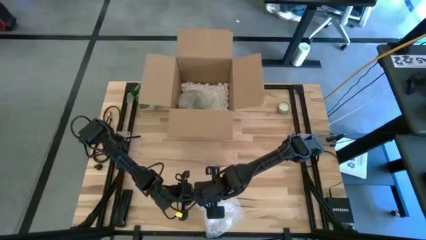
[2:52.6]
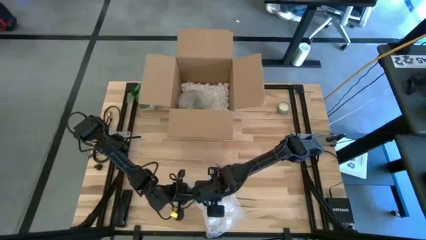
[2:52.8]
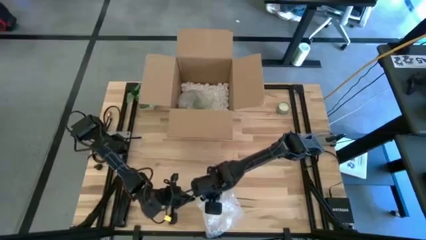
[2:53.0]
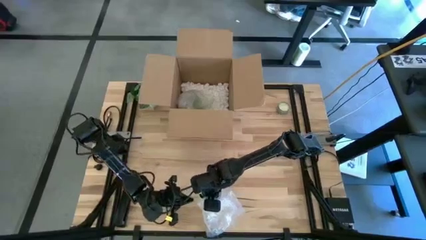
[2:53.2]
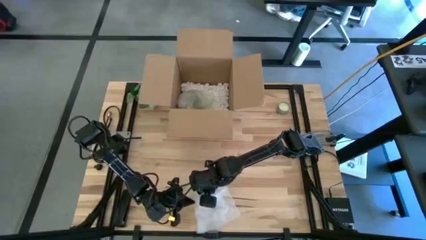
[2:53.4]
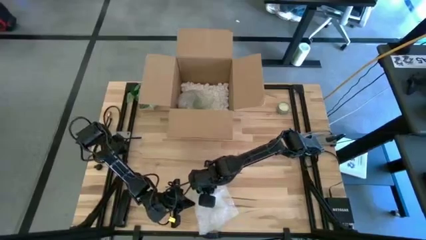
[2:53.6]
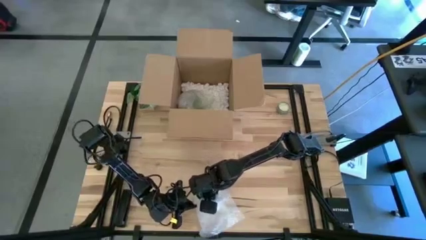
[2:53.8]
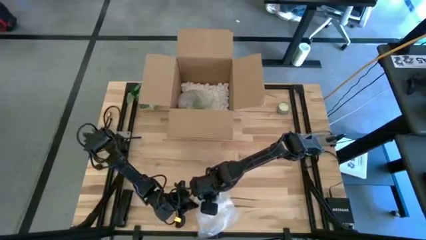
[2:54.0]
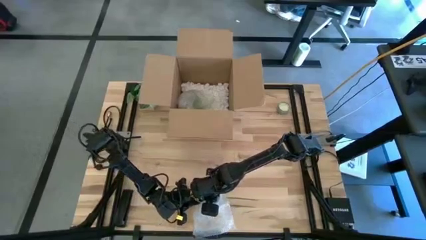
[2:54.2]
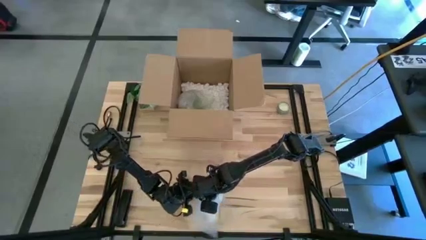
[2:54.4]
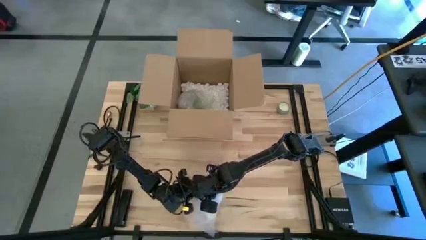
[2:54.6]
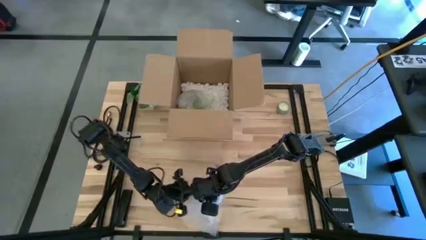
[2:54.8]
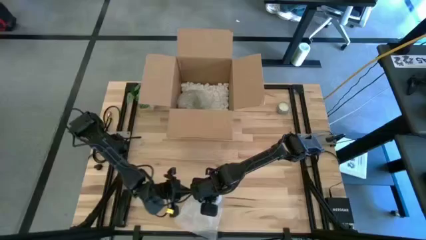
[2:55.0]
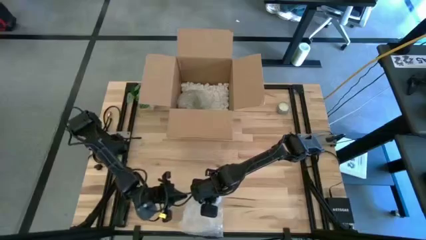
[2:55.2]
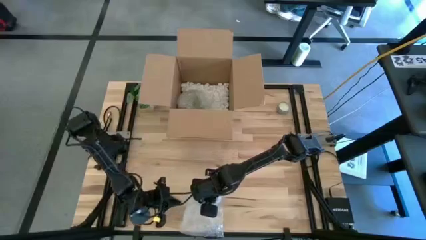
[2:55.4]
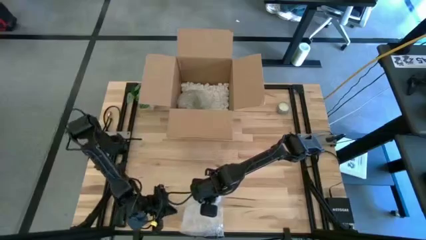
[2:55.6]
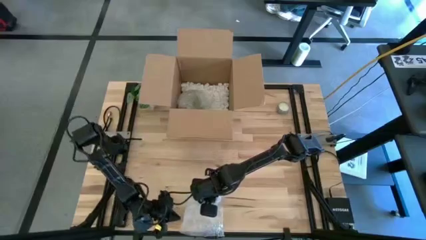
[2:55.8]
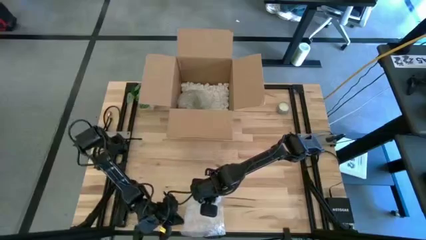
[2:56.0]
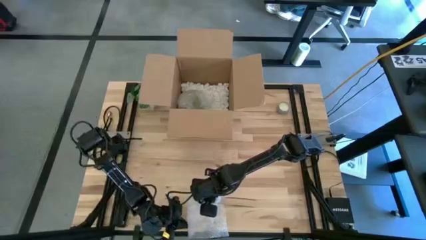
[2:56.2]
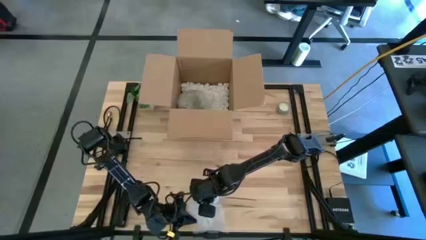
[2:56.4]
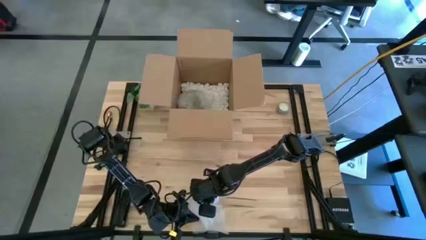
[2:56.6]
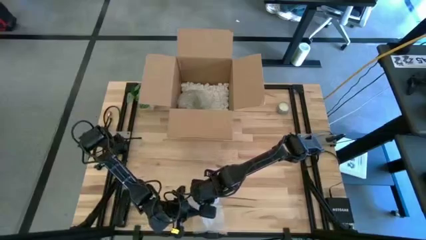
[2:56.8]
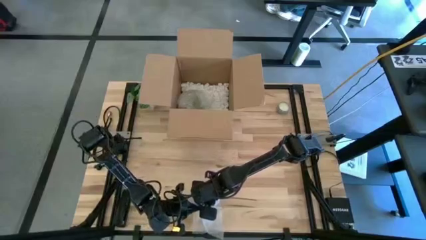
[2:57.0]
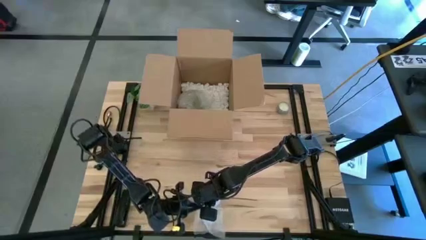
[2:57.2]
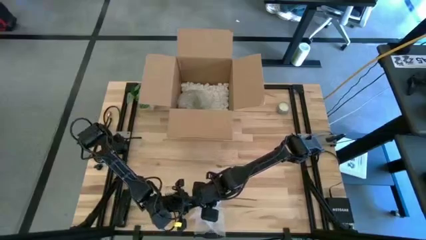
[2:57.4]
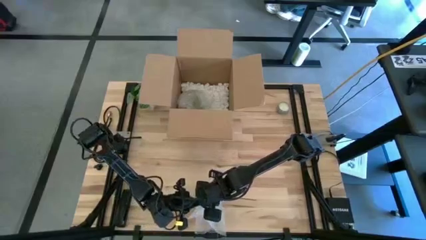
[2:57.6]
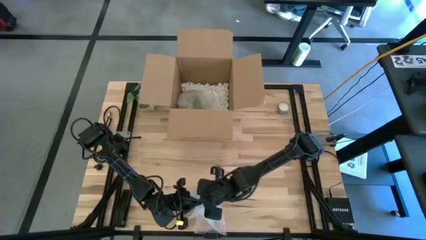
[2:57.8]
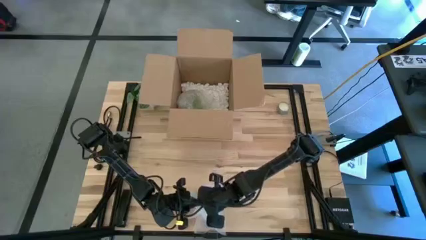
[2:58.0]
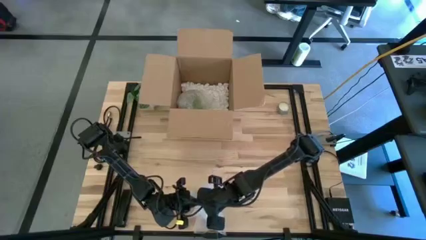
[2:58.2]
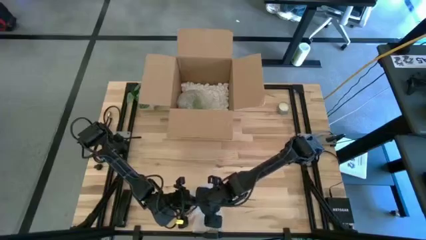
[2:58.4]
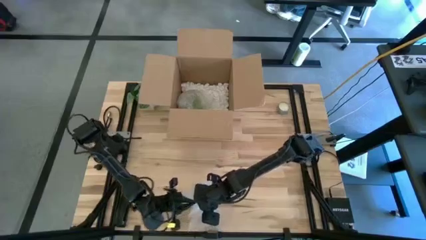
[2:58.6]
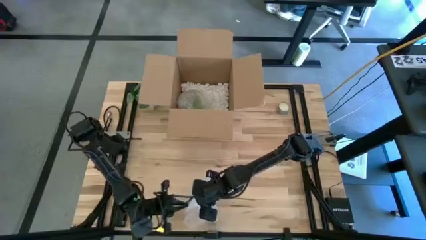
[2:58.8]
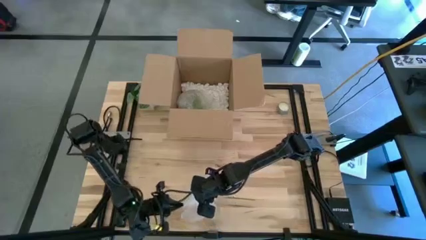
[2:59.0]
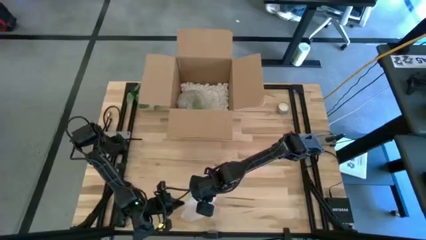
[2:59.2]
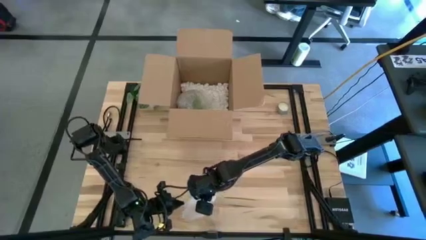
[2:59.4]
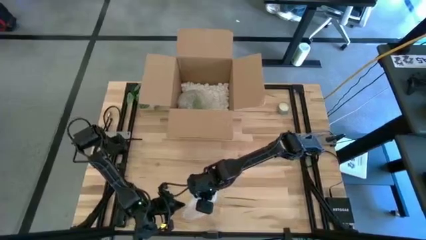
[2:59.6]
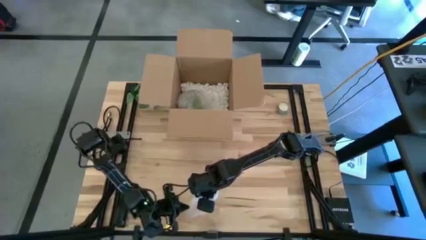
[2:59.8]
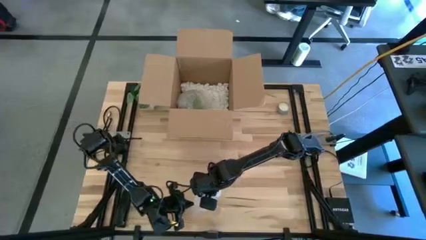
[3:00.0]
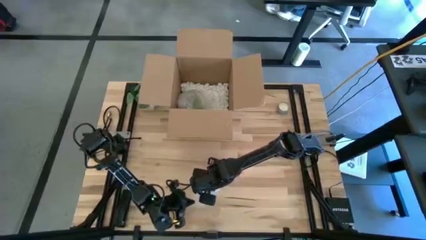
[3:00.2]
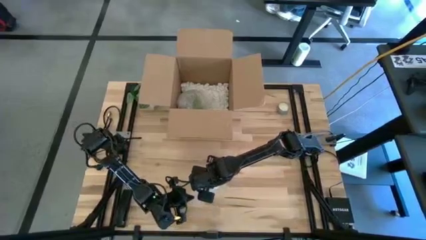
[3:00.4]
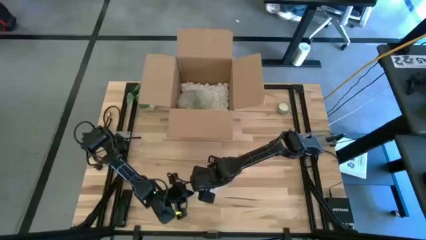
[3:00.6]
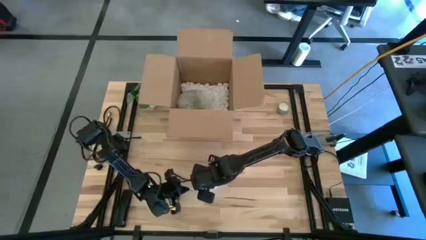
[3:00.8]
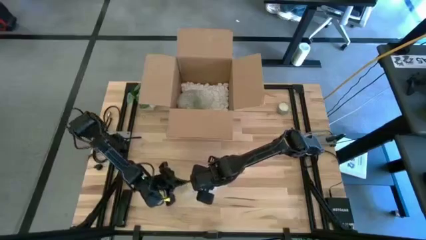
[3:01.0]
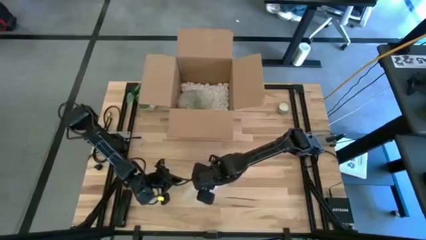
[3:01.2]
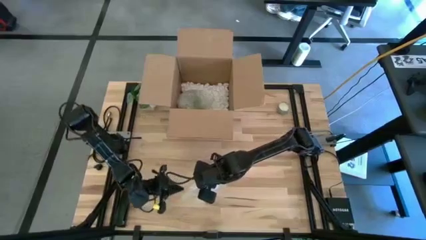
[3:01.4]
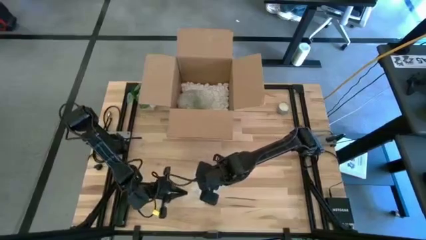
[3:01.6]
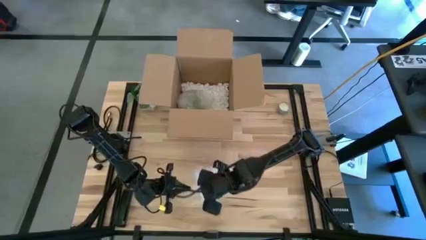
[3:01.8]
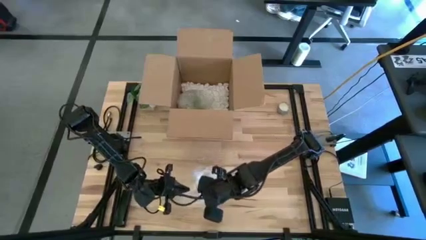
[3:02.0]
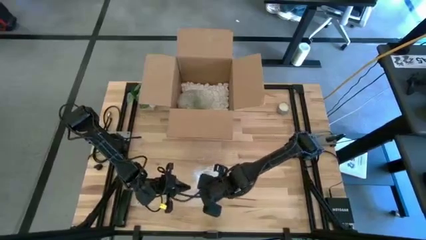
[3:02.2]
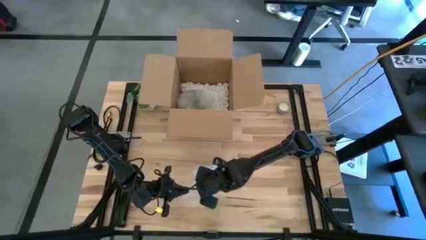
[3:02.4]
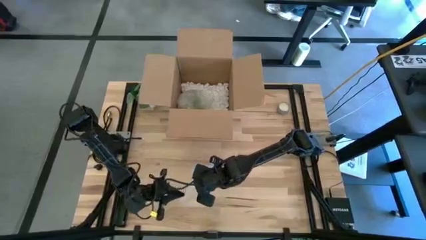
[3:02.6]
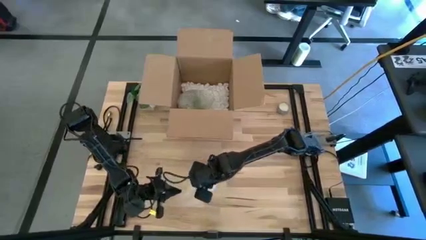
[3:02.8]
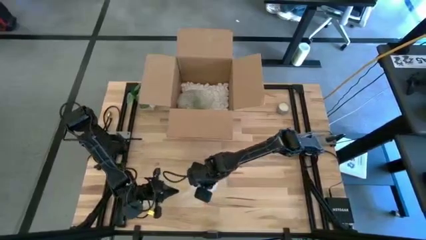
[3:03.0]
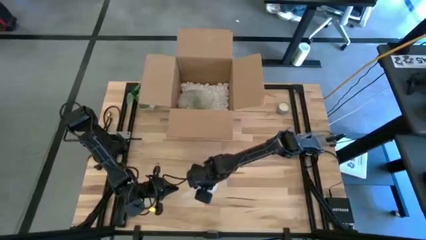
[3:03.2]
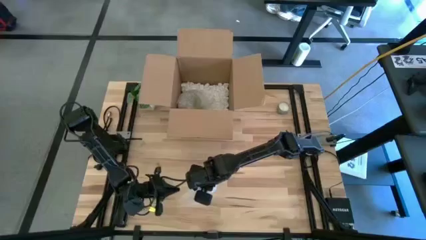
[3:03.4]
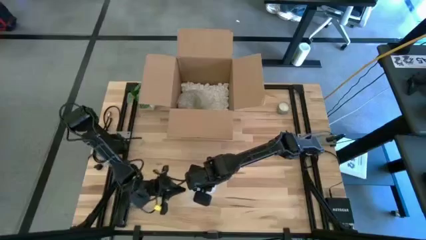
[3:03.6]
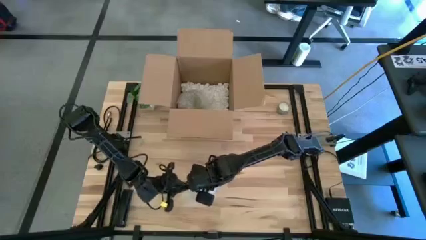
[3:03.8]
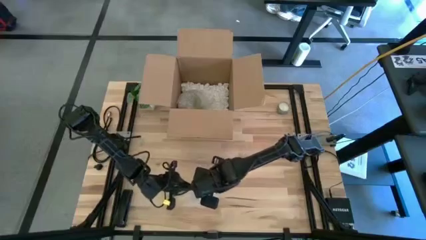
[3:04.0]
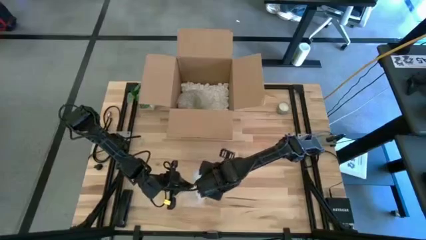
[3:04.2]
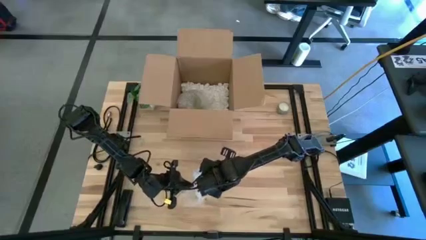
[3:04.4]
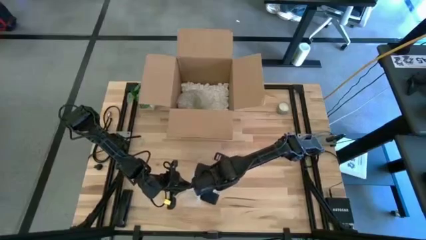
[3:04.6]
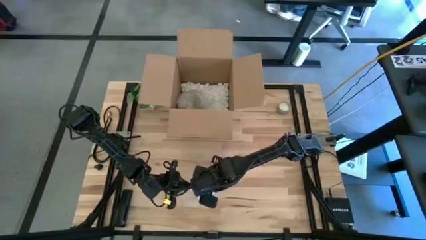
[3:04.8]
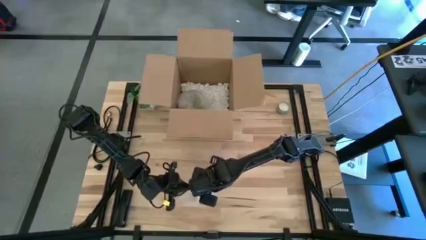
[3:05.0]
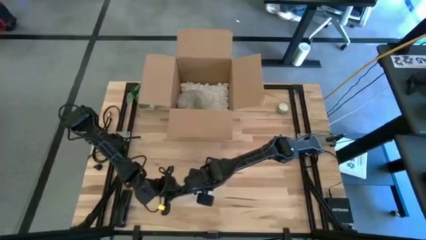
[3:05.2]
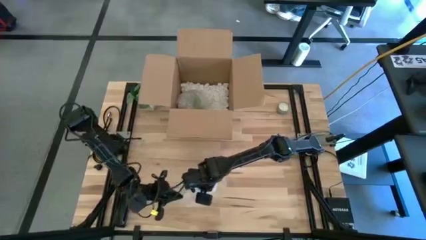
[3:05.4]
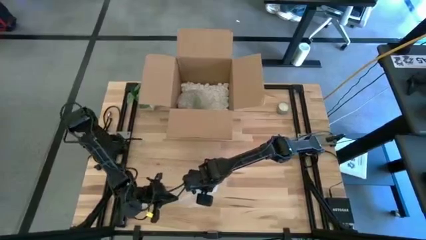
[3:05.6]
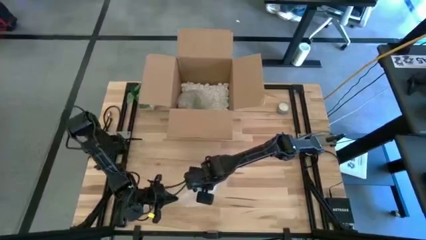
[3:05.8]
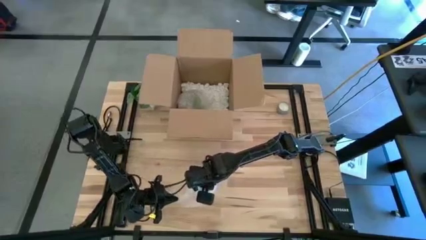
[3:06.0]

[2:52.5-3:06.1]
Task: wrap mug
Wrap the blue mug with the bubble wrap

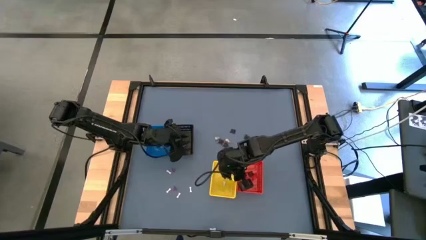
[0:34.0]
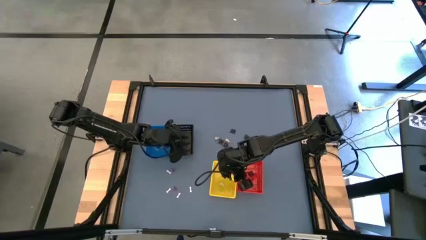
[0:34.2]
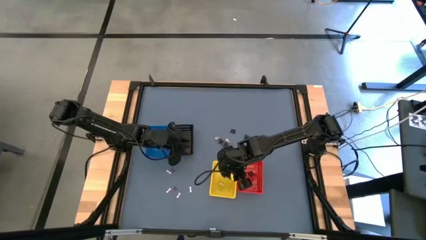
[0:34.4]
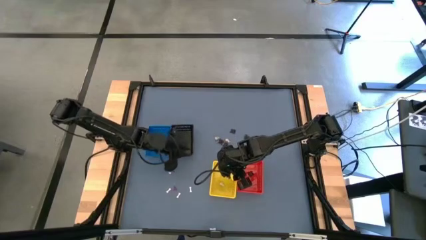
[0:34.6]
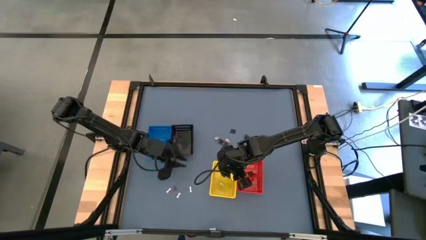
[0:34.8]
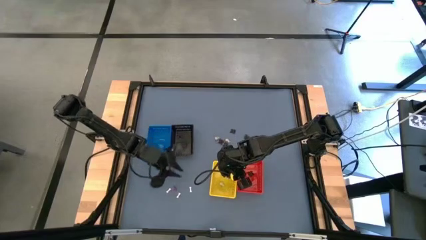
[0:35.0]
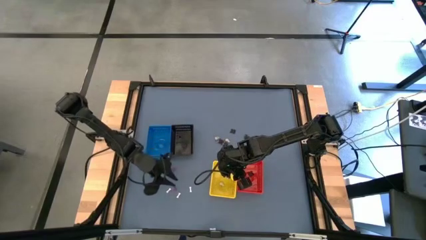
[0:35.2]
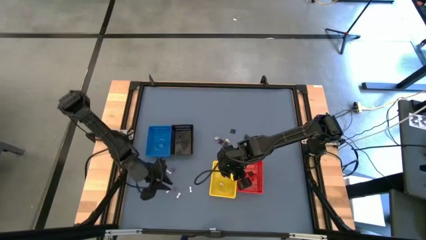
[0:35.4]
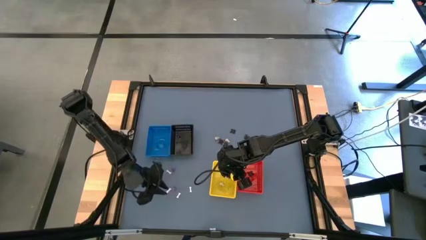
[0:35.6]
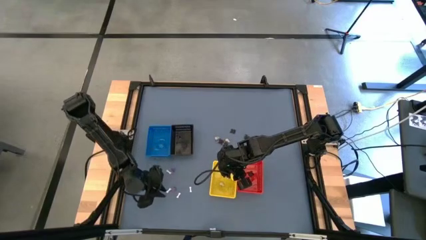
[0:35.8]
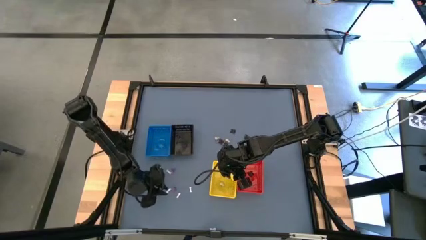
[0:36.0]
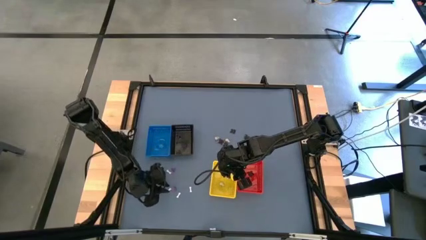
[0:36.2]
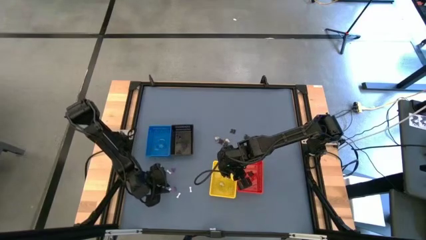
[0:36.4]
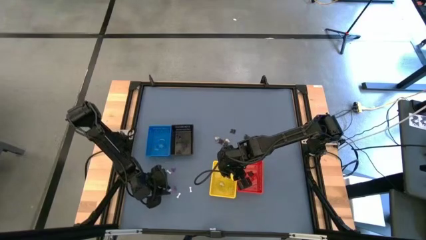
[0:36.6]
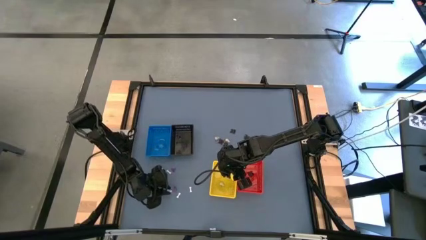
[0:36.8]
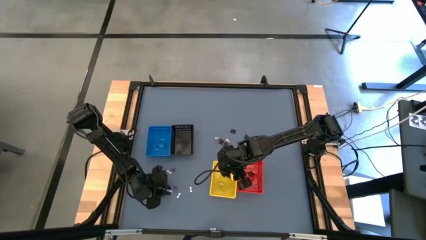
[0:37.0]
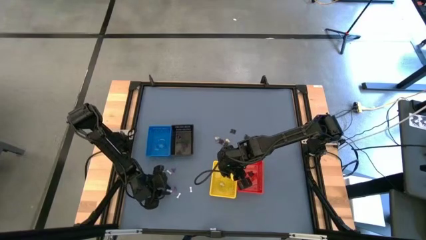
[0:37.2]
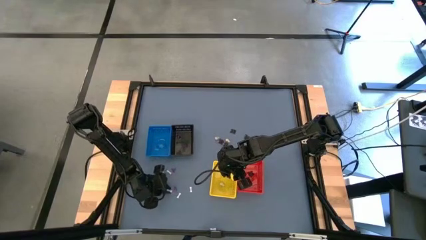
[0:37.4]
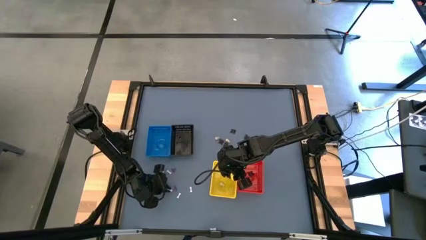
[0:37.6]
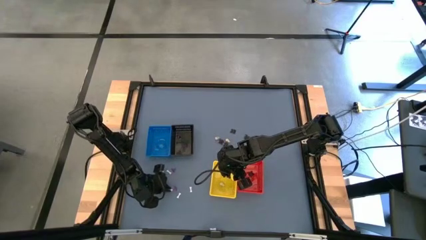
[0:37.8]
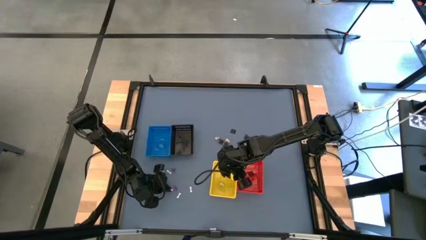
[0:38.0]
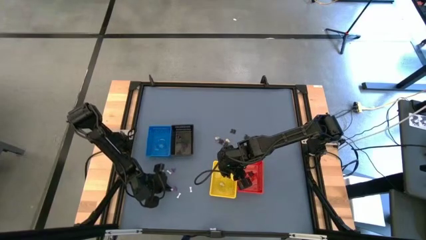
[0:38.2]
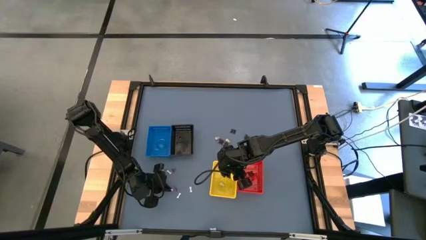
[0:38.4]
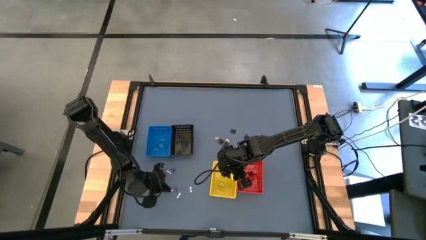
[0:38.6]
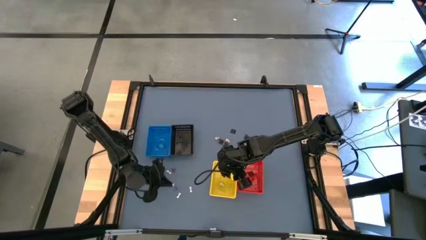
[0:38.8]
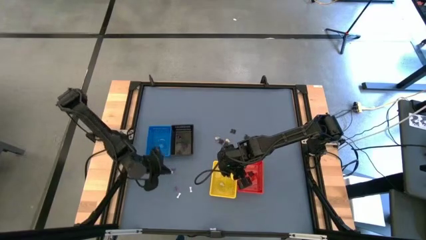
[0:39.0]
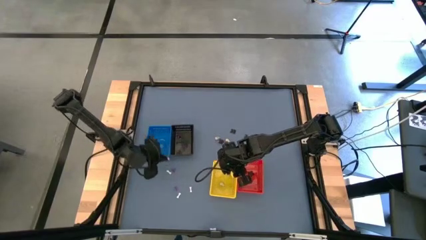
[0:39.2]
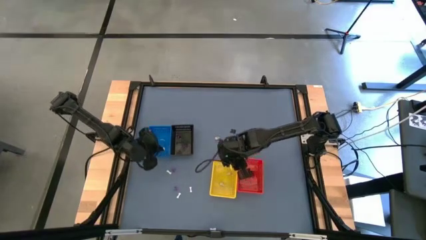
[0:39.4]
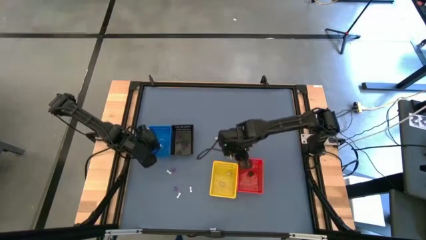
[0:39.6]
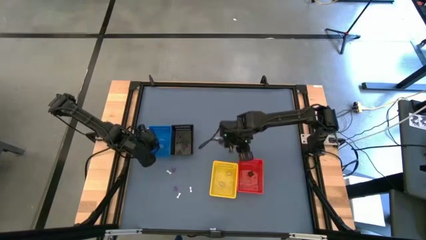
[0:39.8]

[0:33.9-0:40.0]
Task: Sort Halloween decoration
Put the bone toy into blue bin
